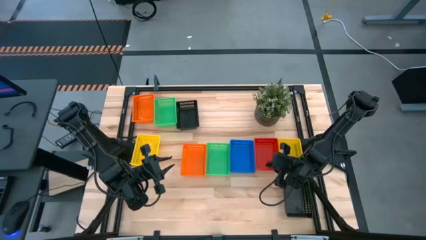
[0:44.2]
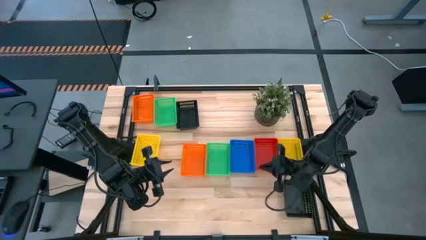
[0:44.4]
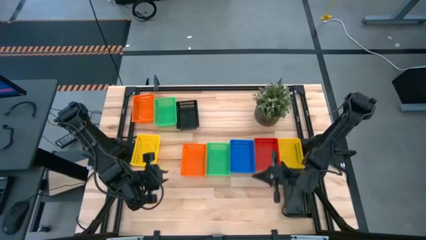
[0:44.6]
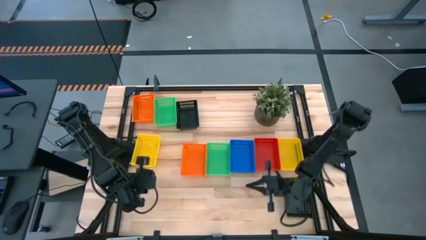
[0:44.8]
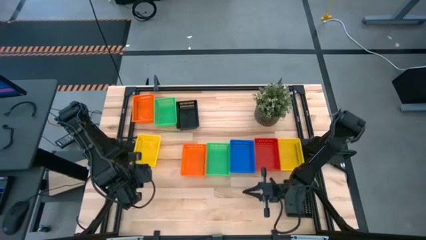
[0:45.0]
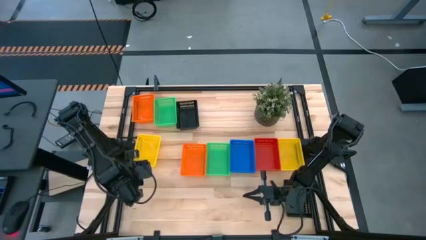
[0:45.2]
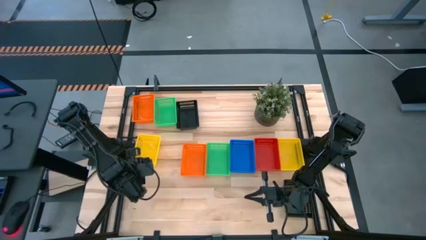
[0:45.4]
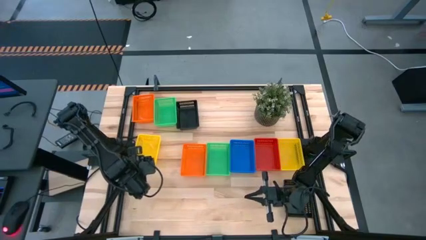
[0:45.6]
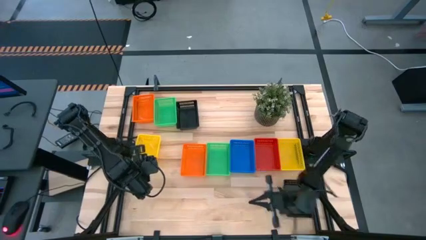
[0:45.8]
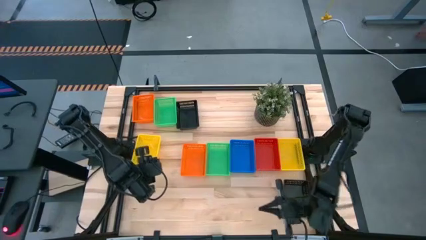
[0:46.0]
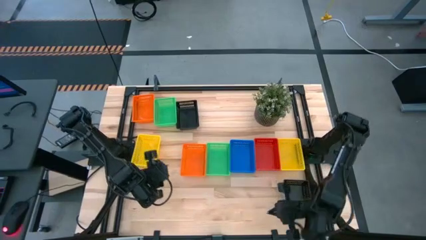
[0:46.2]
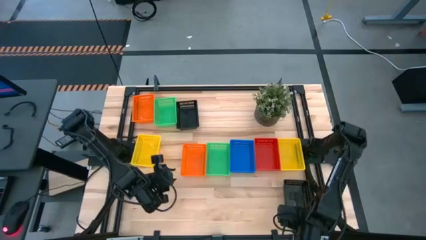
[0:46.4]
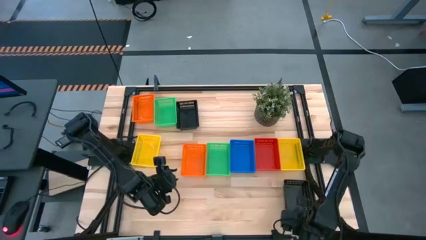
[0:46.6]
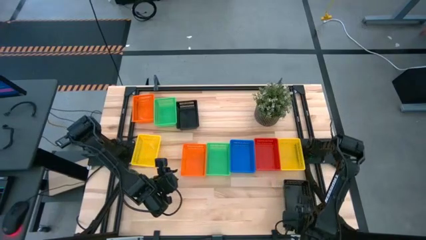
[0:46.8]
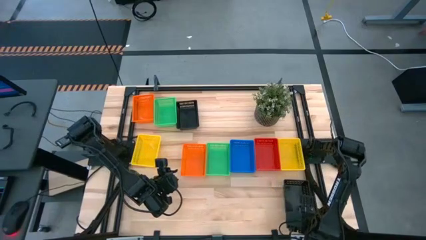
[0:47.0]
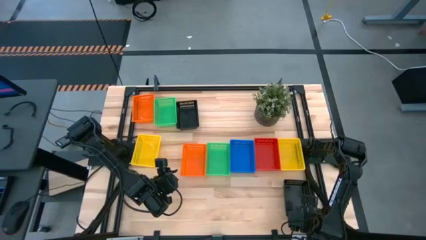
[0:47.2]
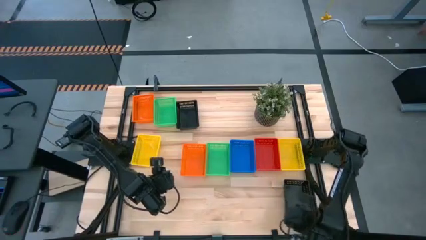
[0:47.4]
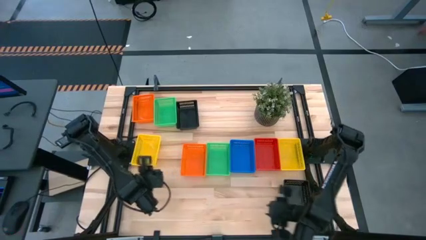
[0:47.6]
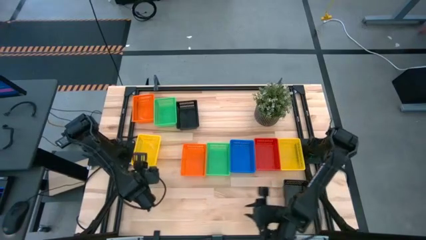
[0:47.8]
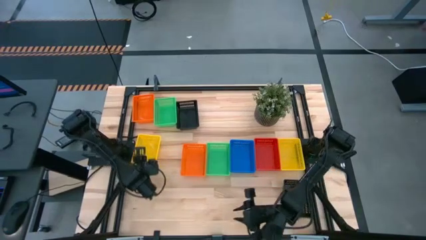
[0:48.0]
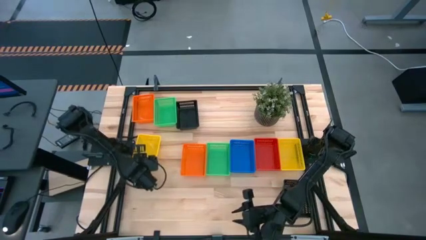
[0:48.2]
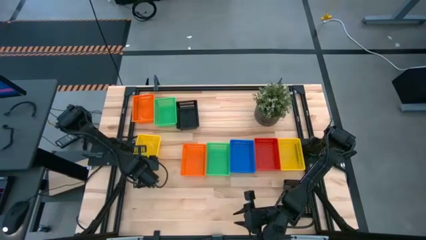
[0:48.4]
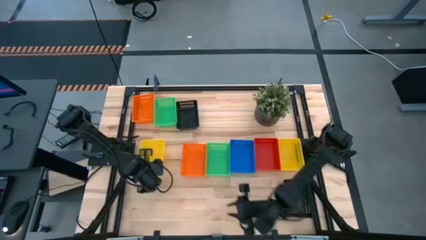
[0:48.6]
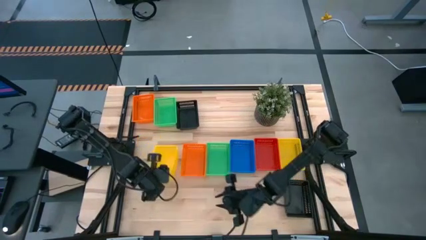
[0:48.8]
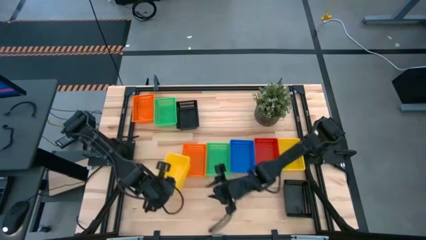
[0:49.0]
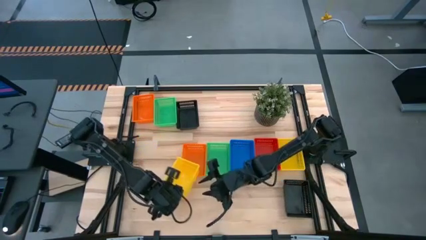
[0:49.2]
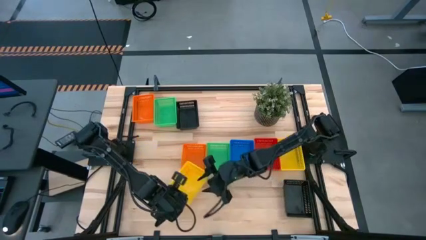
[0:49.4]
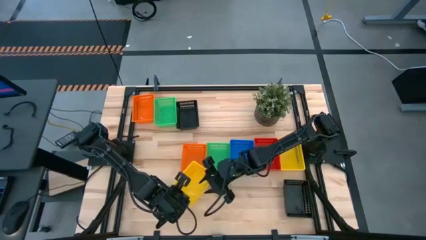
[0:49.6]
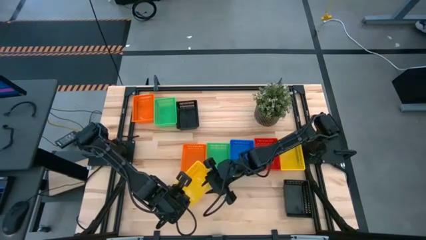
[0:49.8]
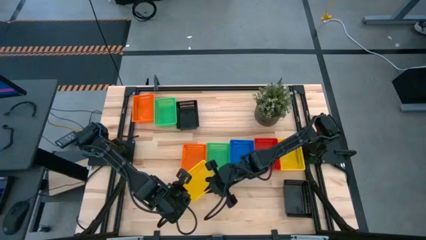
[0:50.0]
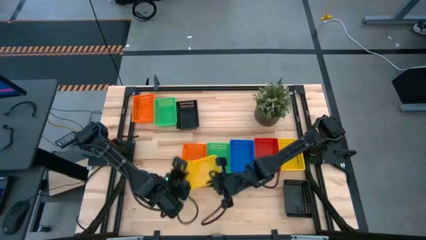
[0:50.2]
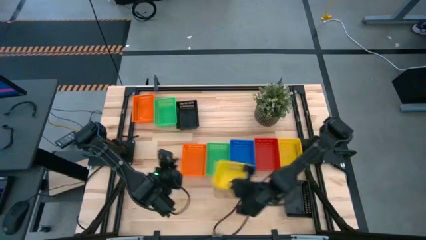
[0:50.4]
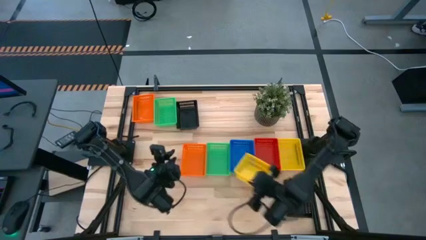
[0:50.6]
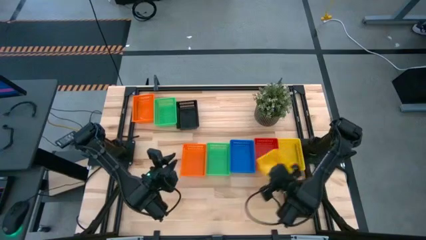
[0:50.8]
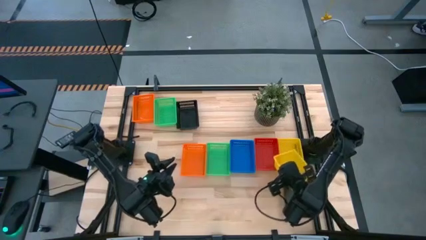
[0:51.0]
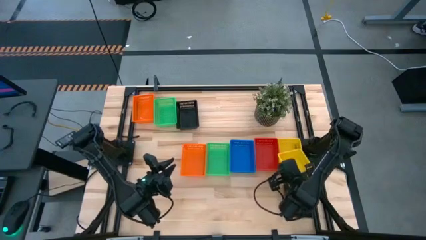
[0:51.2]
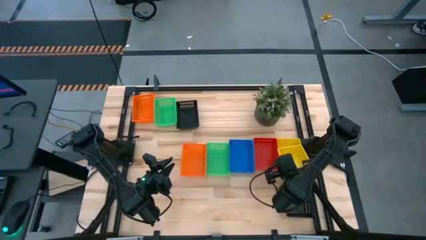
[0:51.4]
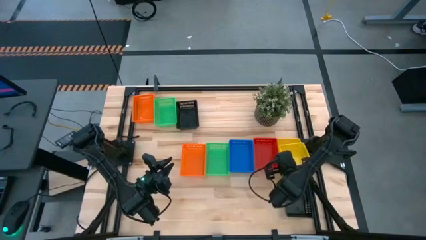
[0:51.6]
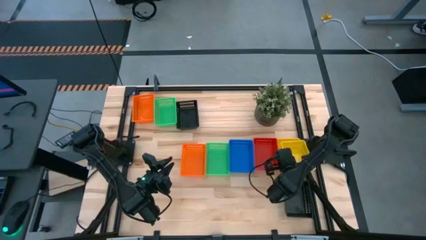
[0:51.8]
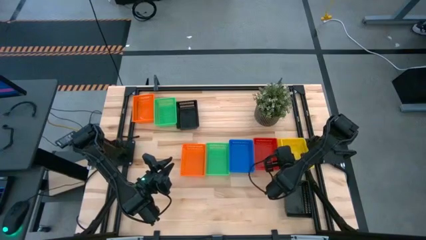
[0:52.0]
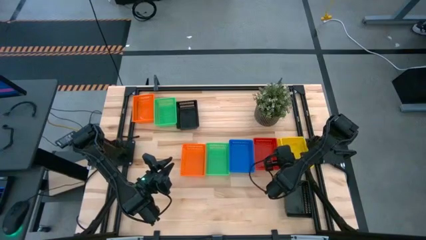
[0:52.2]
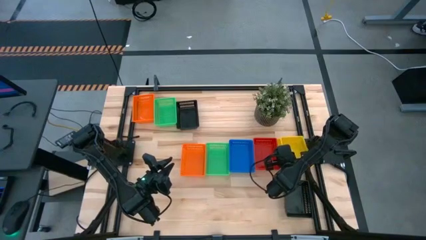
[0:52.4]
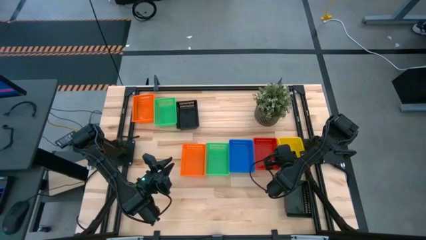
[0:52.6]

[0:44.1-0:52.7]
Stack the left yellow bin on top of the right yellow bin

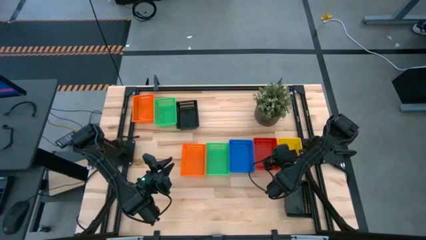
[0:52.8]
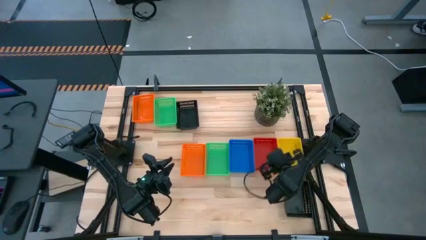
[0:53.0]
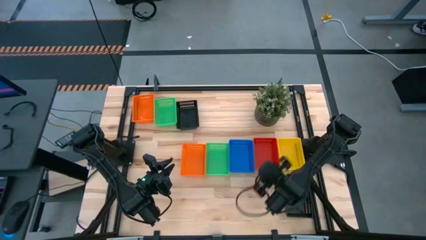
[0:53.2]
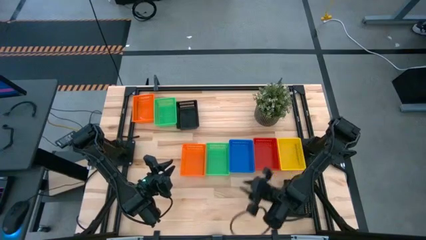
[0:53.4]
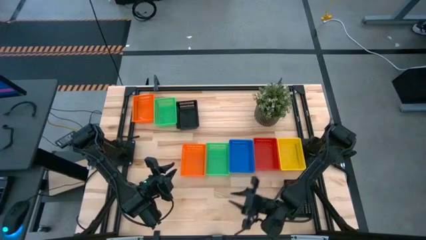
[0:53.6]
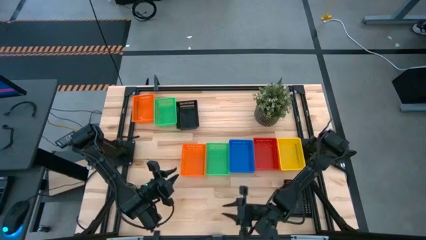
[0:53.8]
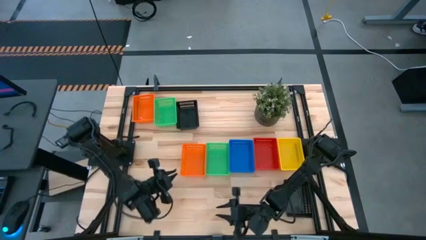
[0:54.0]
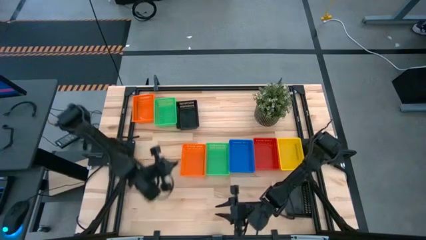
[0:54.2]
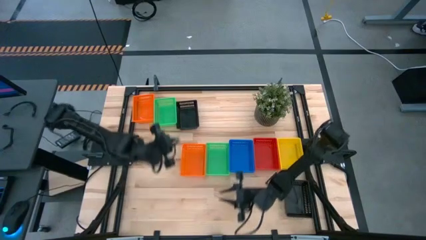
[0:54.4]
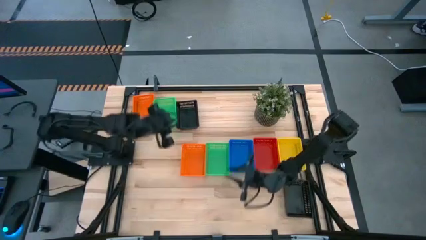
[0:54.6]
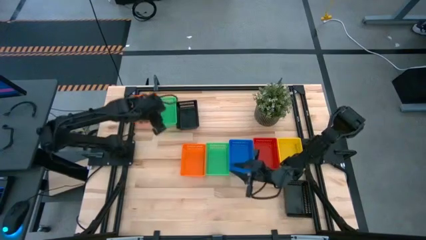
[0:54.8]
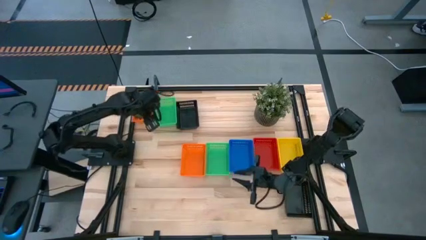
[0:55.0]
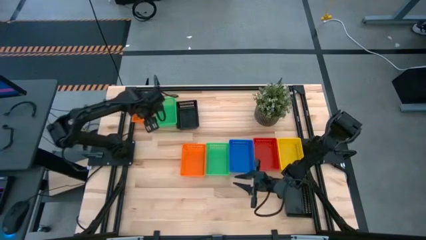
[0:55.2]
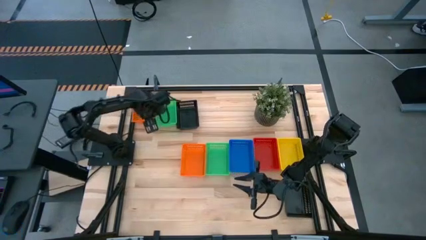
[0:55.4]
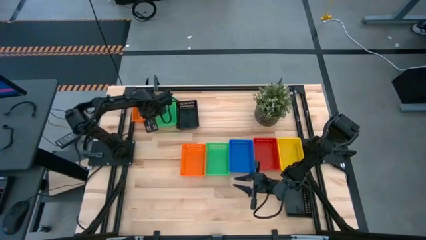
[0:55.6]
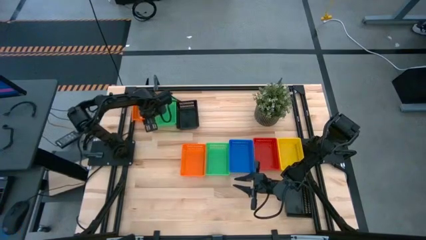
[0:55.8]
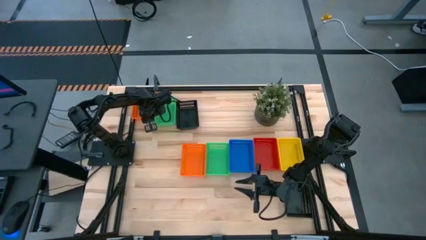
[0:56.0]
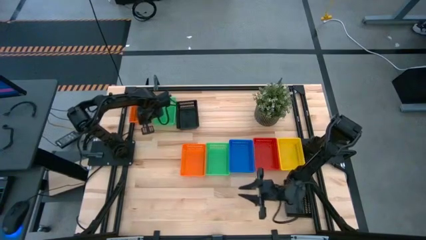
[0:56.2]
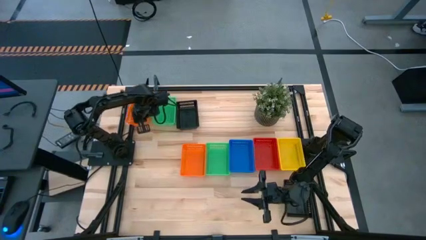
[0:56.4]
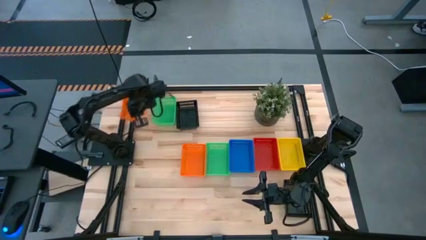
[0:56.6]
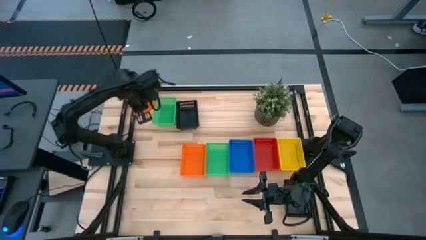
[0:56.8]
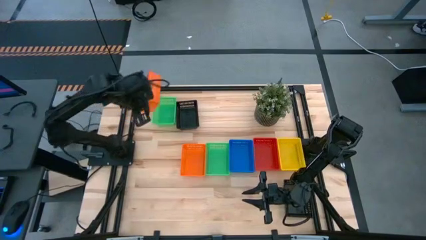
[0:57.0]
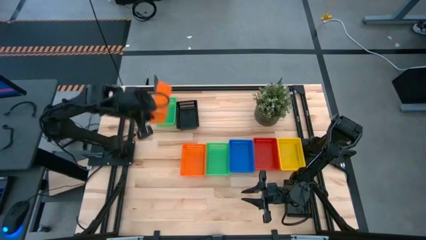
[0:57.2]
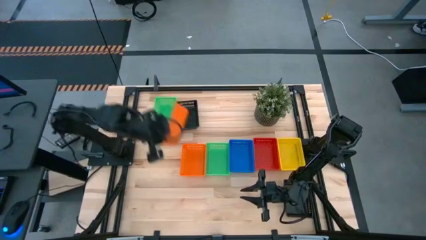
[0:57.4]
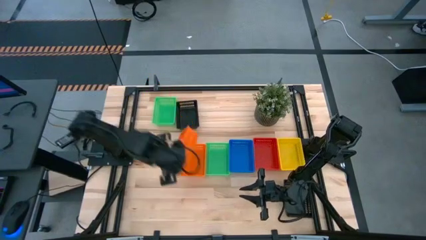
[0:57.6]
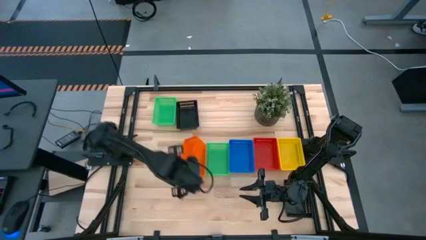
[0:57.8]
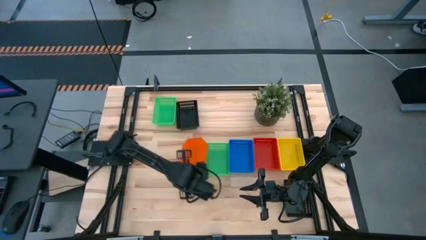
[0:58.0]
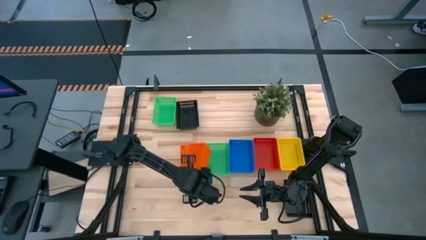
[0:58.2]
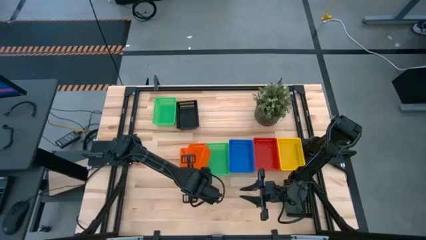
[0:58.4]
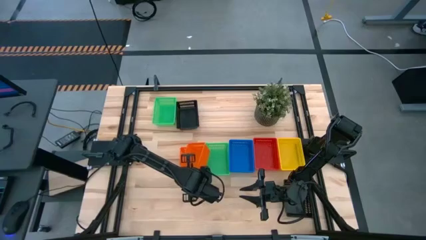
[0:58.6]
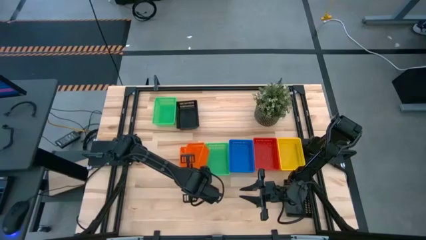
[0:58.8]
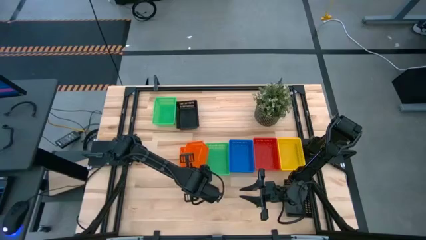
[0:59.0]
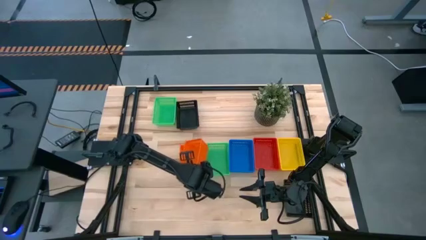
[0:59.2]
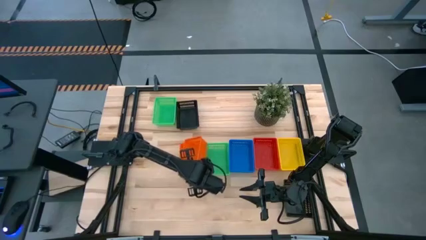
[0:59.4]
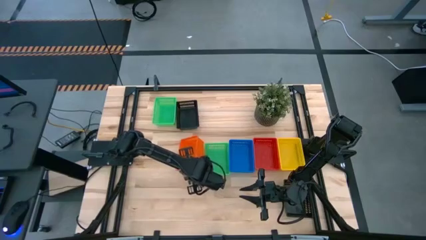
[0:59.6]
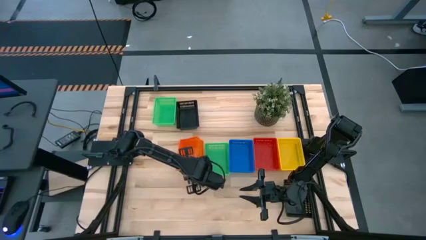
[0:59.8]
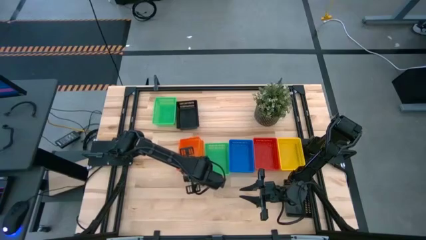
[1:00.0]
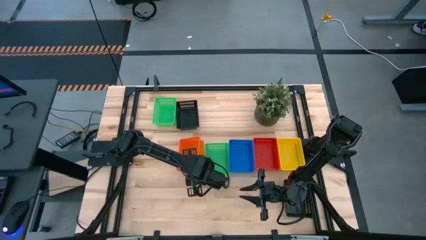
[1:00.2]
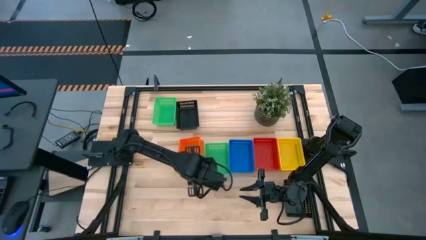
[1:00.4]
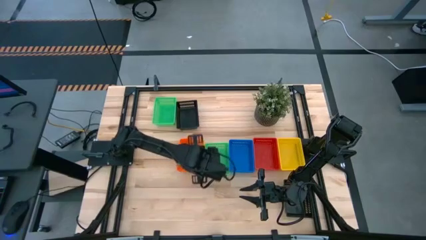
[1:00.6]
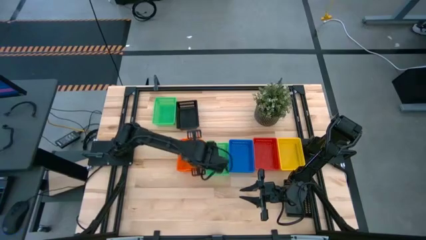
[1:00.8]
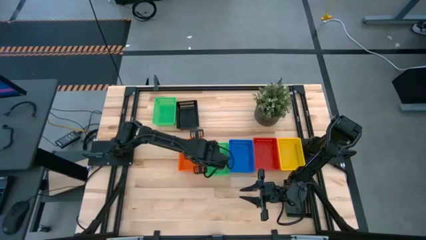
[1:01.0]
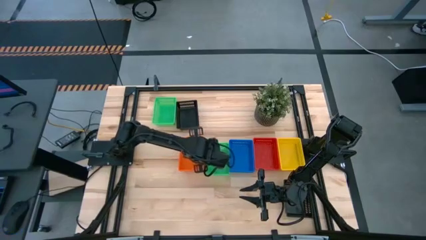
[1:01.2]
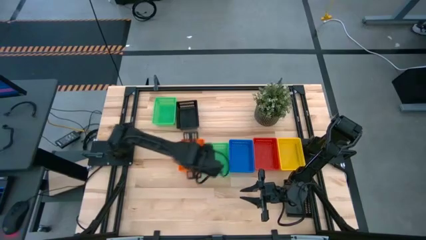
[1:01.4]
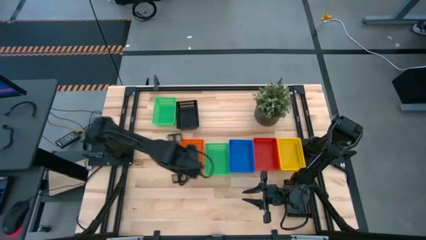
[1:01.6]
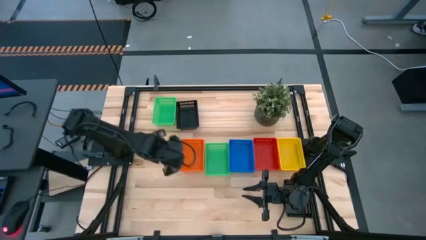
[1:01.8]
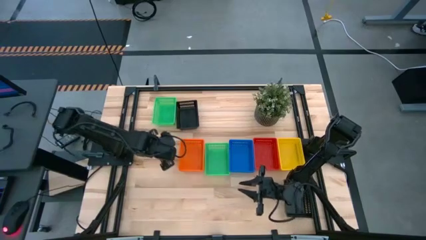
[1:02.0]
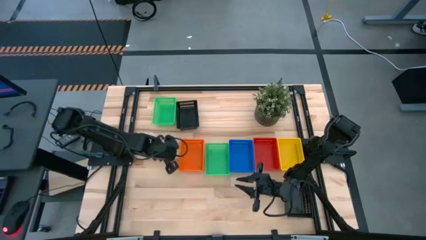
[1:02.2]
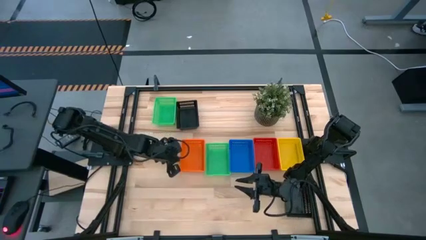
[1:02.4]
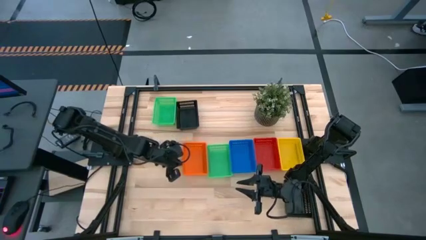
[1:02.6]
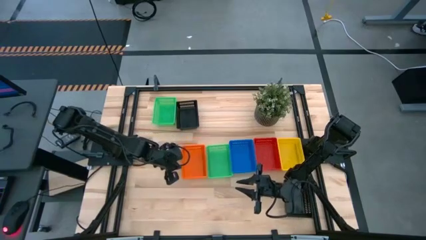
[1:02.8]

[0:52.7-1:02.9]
Stack the top orange bin on top of the bottom orange bin
